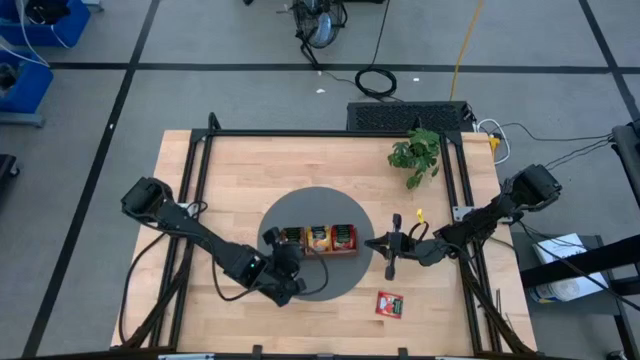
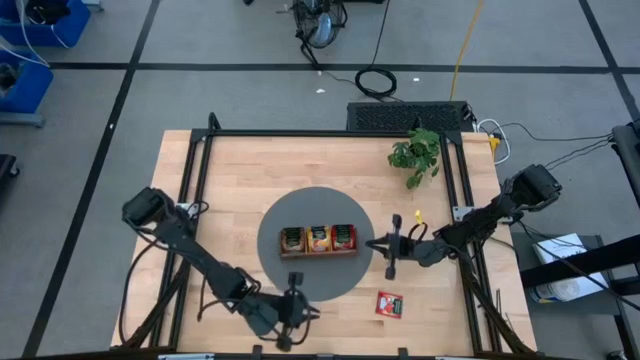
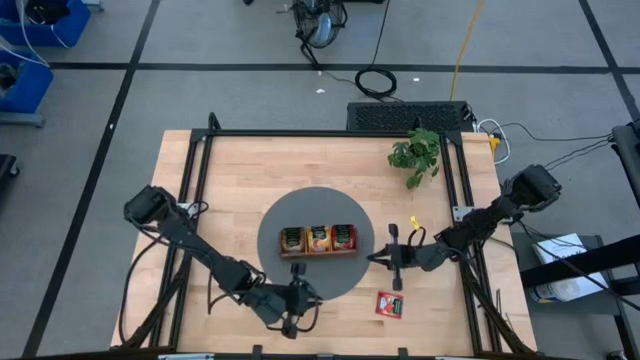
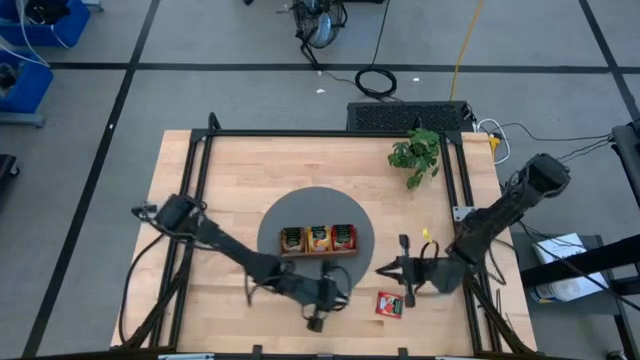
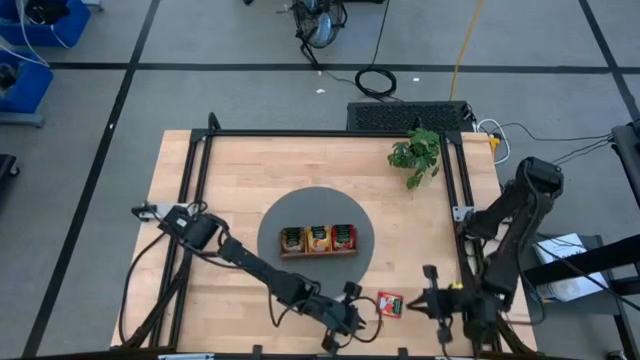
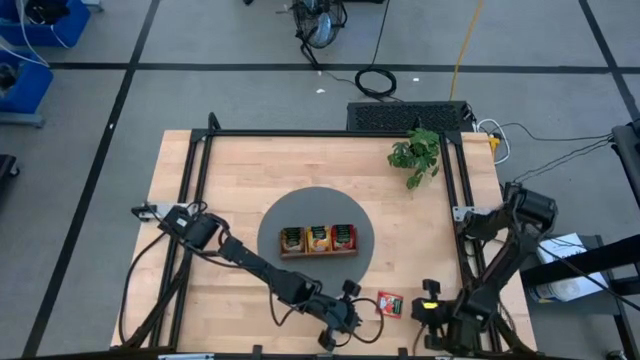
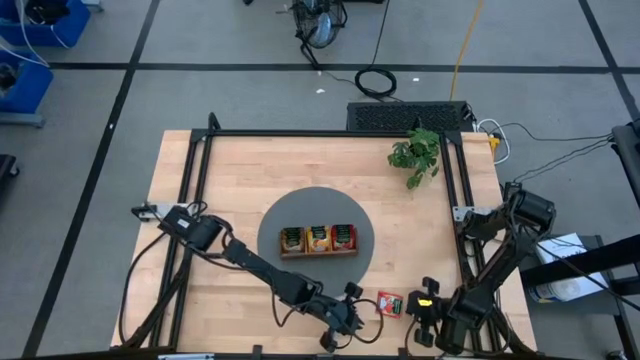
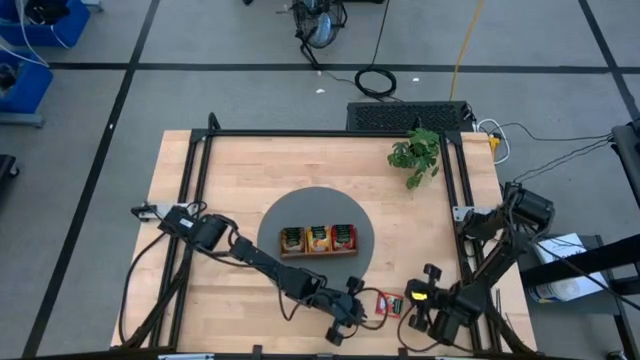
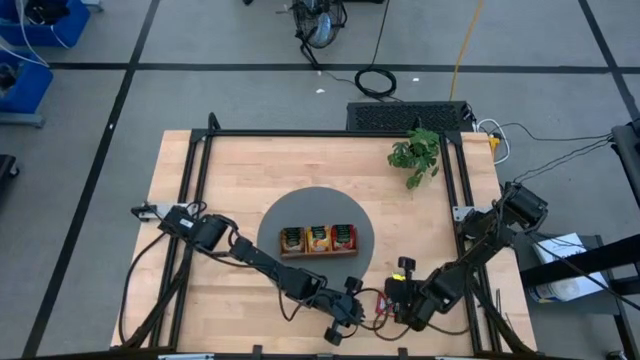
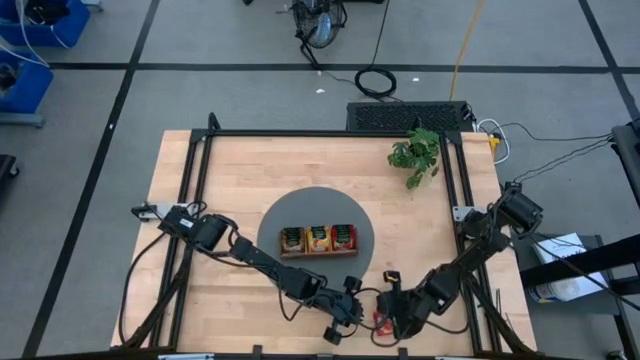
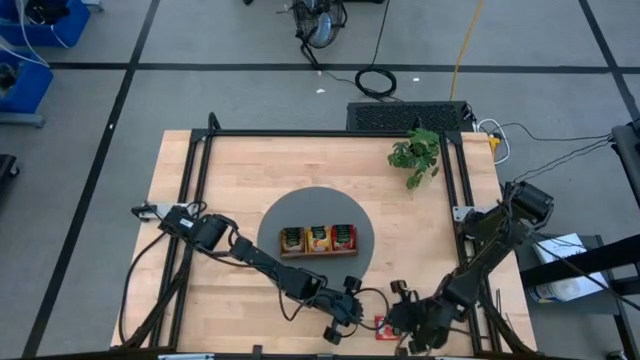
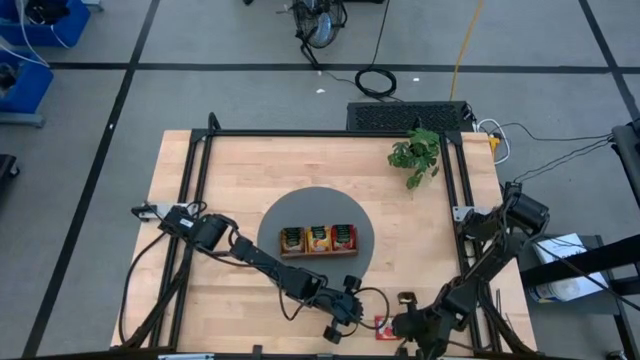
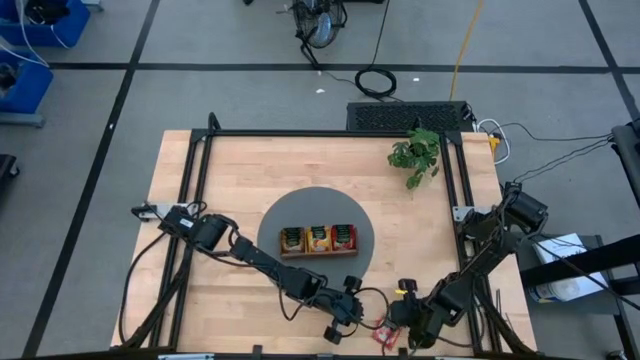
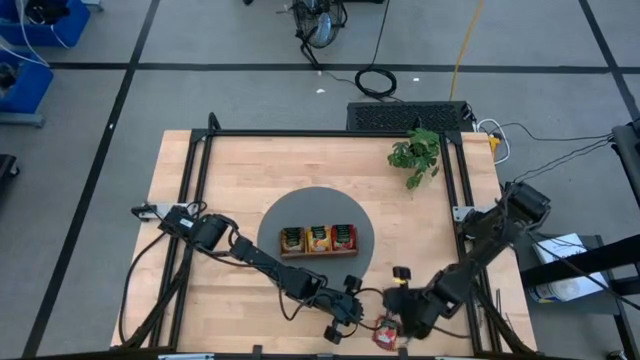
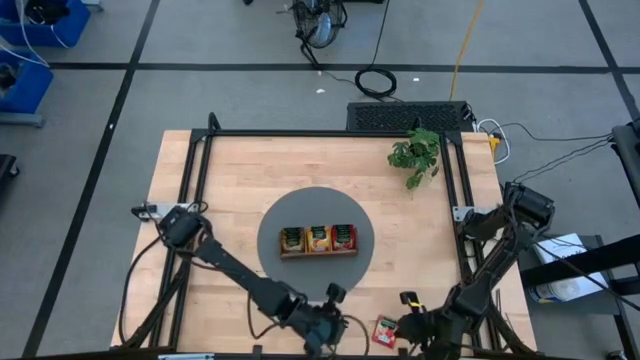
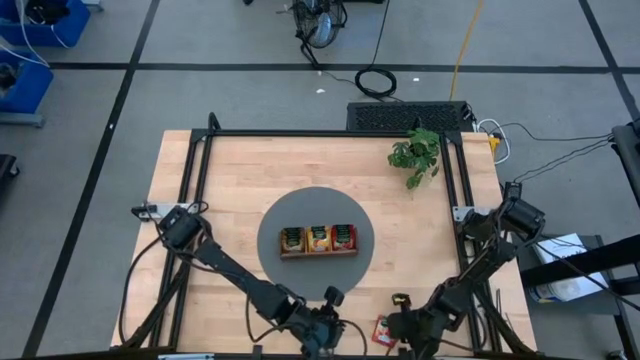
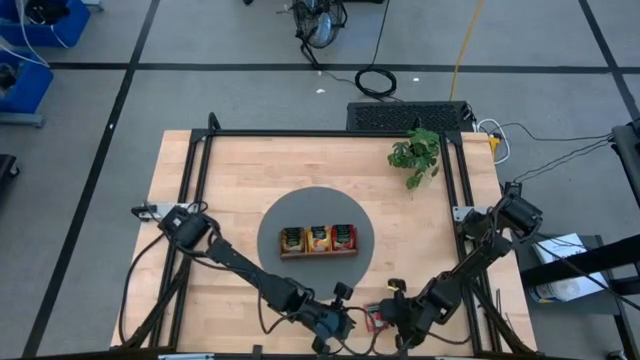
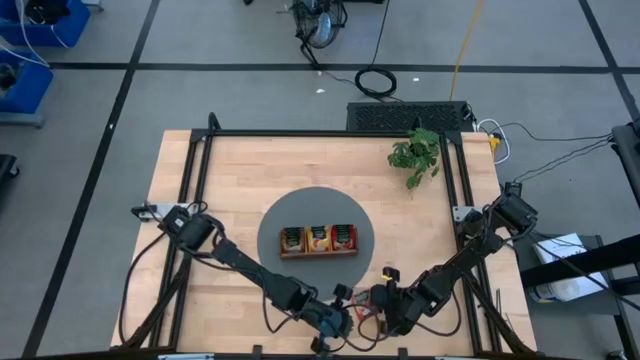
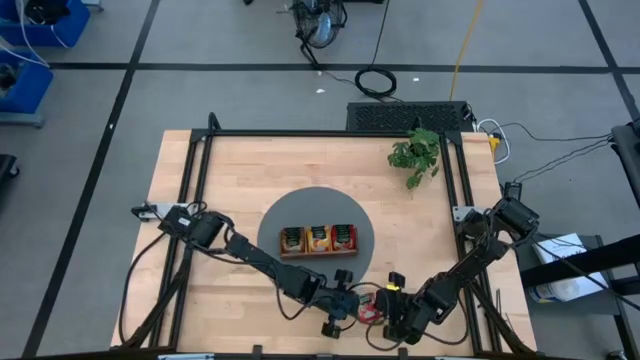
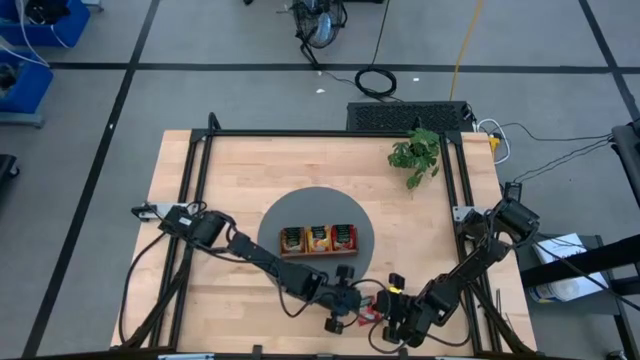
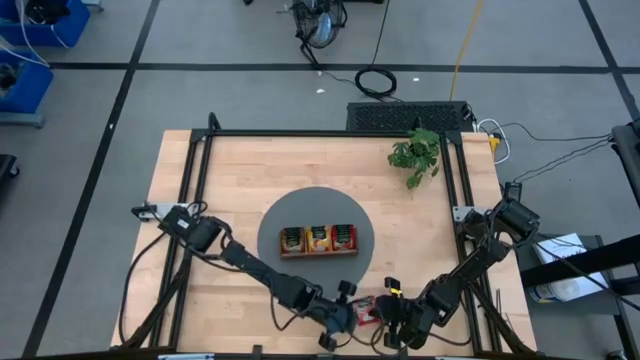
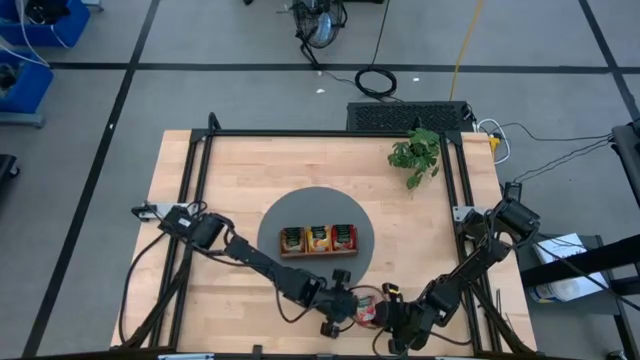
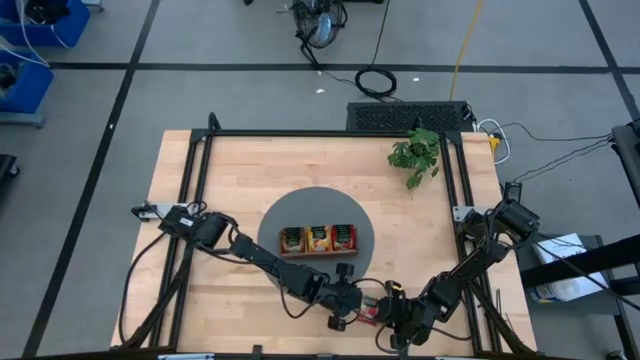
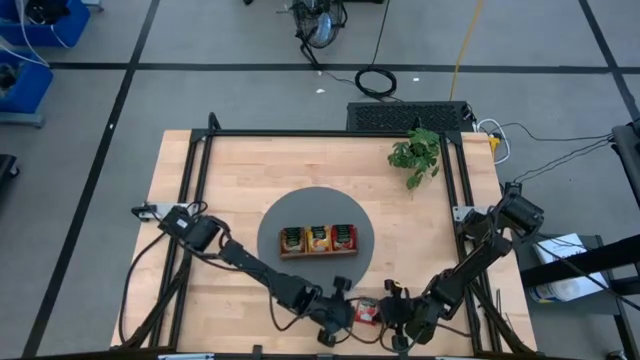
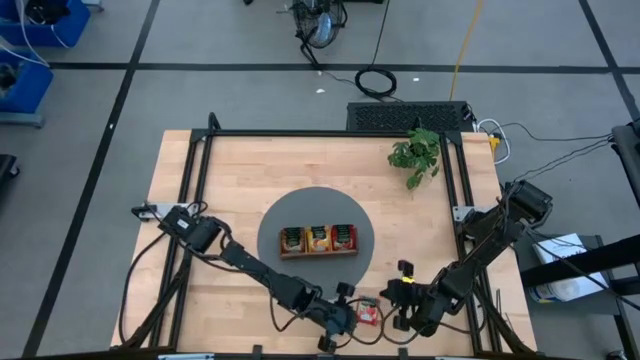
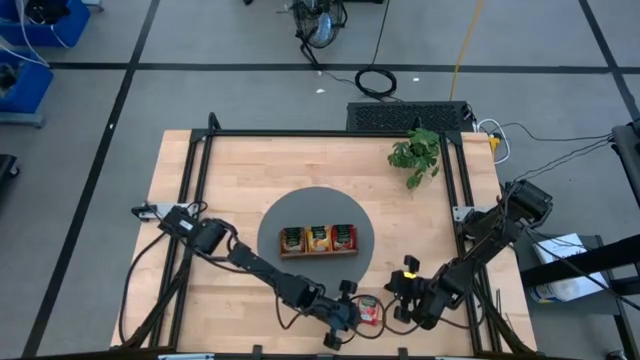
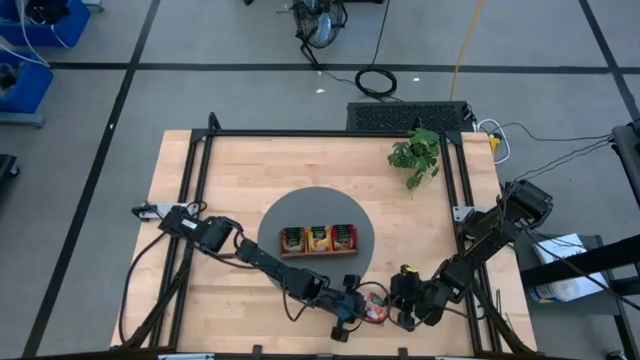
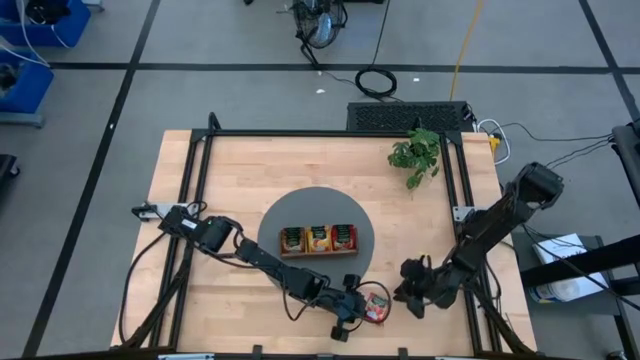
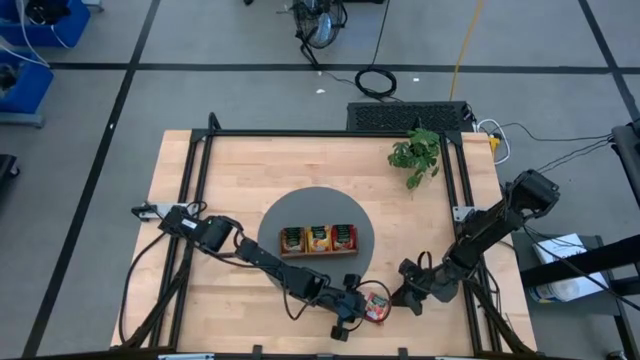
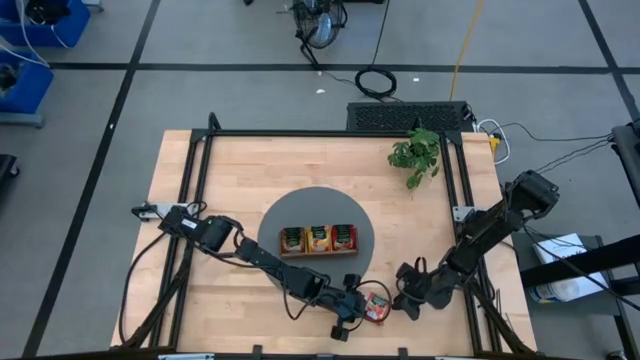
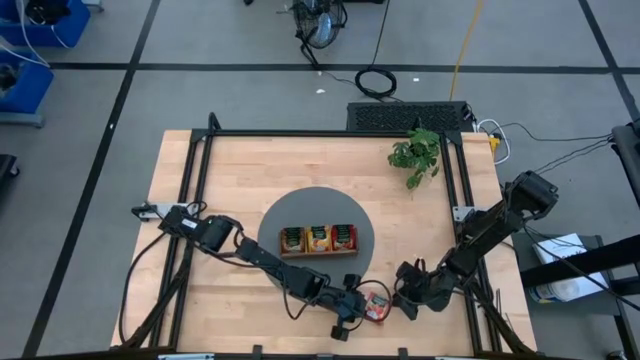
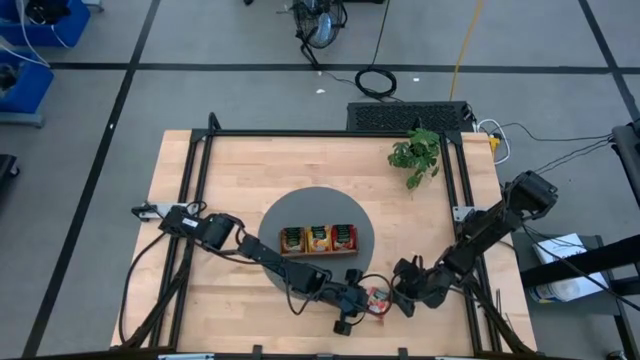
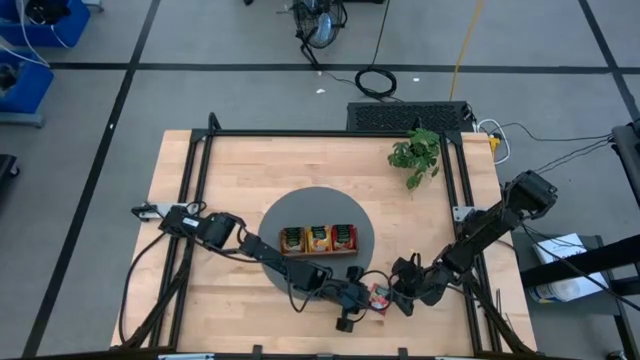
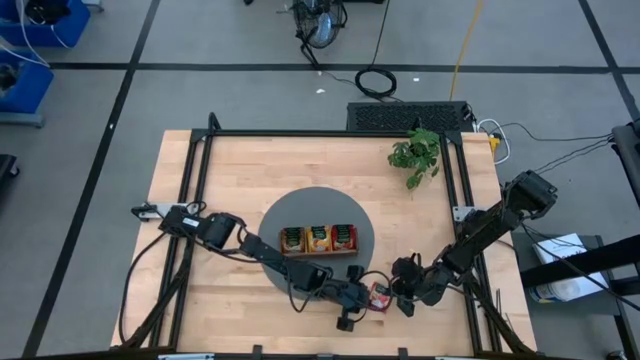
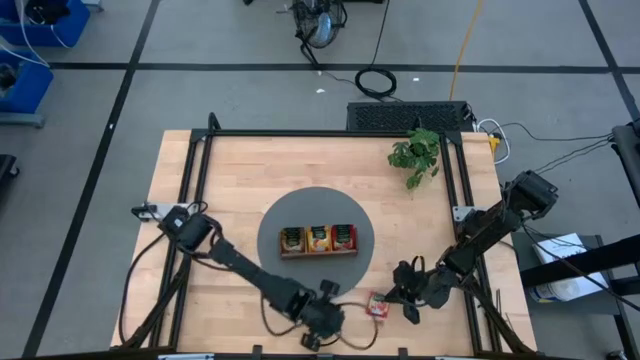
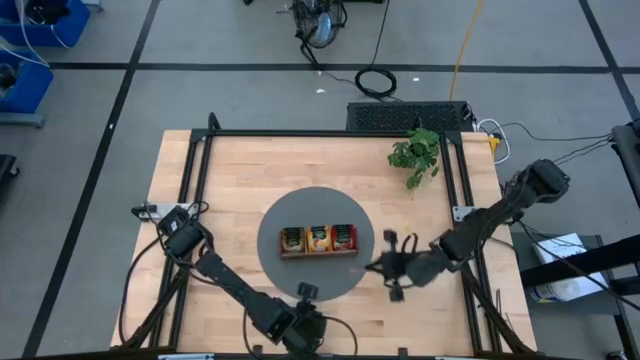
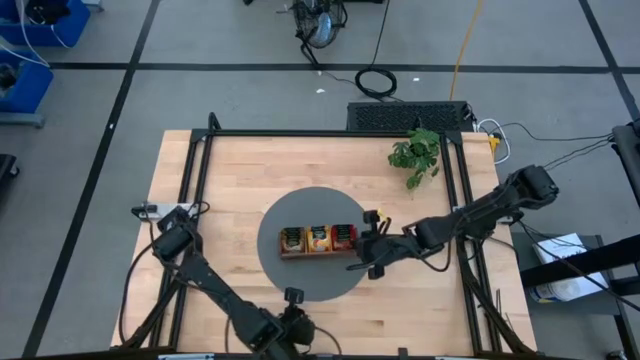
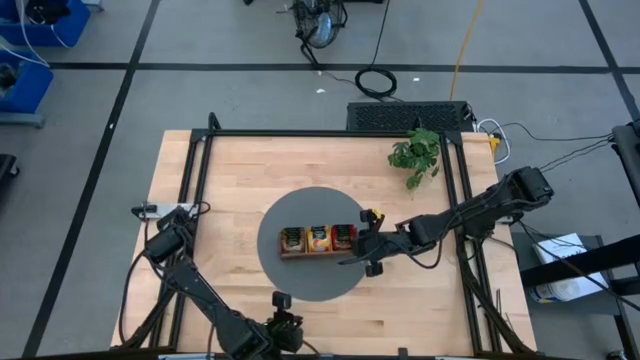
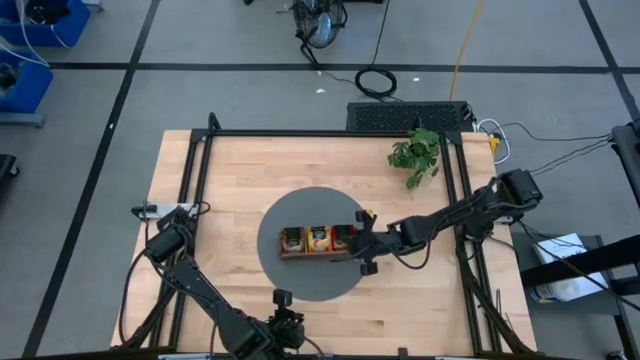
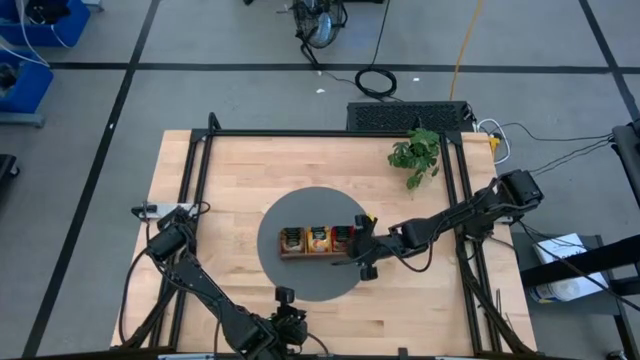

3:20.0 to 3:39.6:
Task: Pick & Place Tea
Put the red tea bag into the right section of the wooden organizer

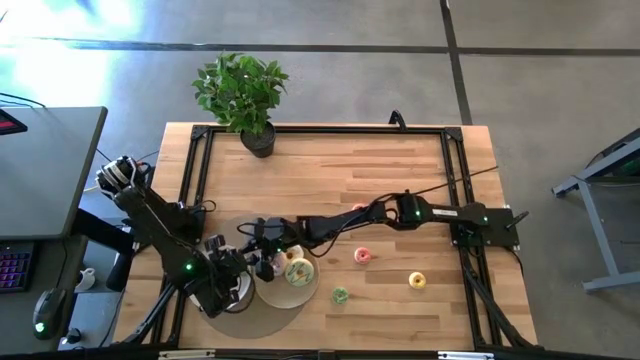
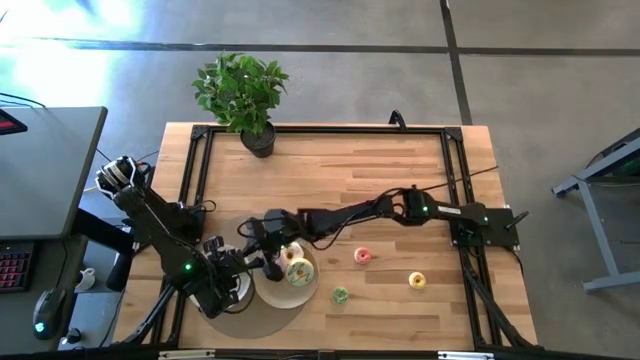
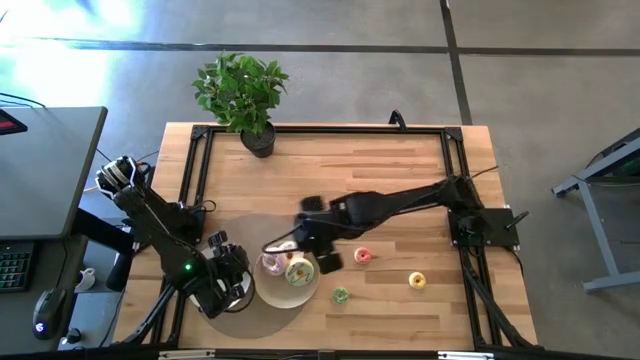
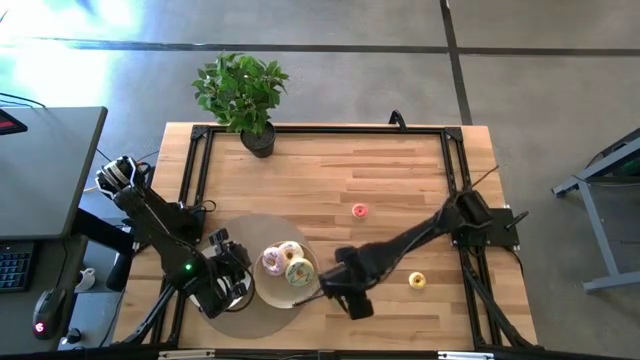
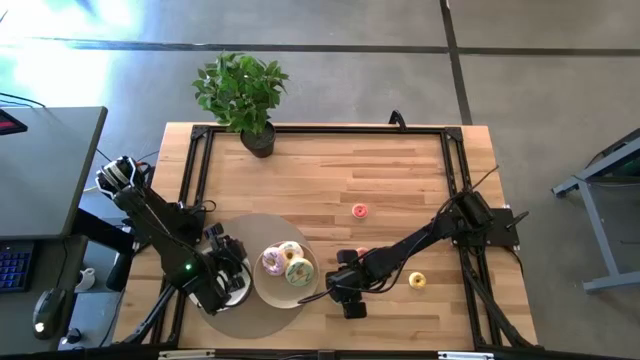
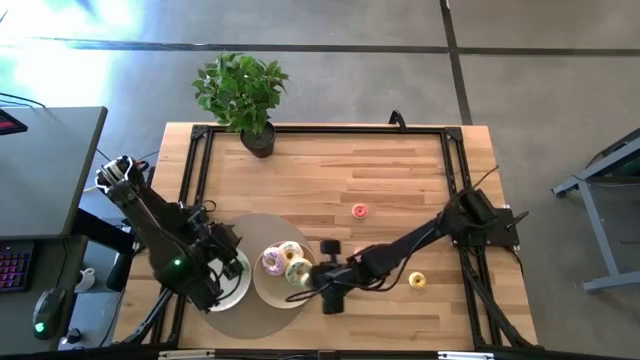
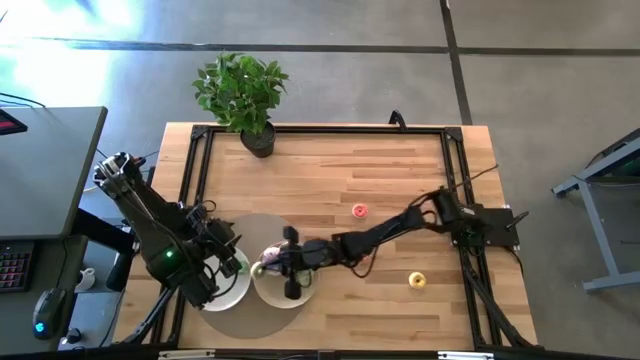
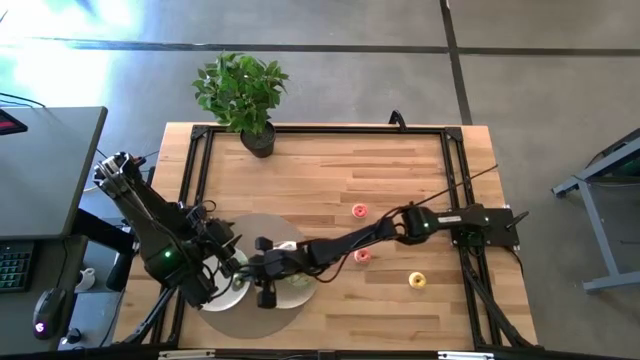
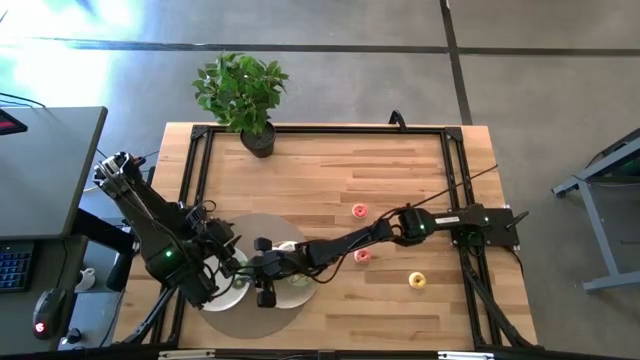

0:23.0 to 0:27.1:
Task: Pick & Place donuts
Put the small green donut on the white plate
